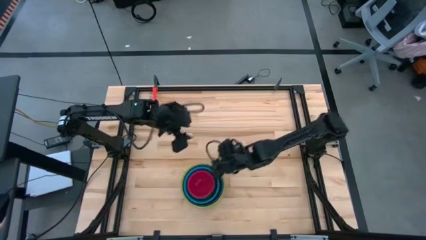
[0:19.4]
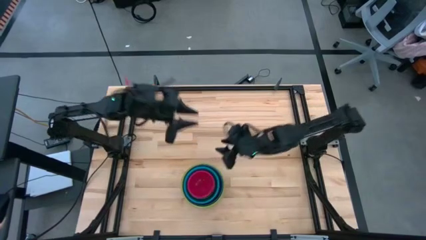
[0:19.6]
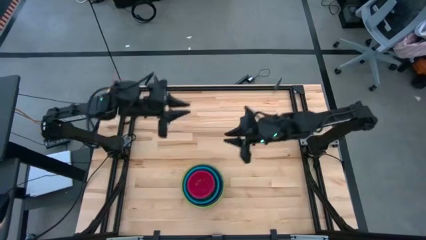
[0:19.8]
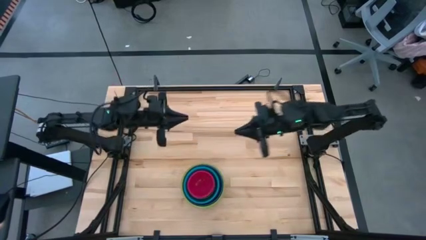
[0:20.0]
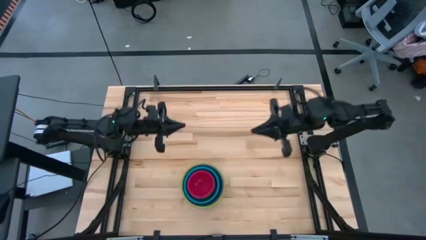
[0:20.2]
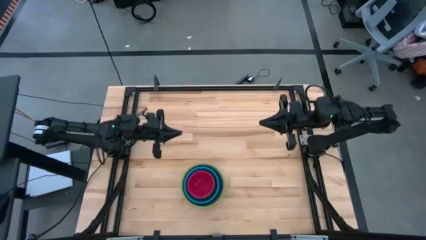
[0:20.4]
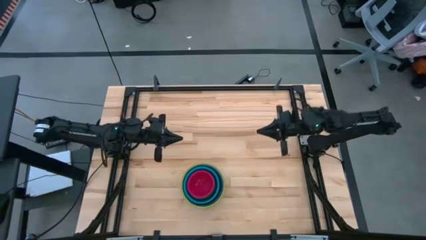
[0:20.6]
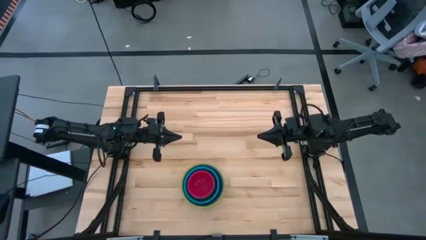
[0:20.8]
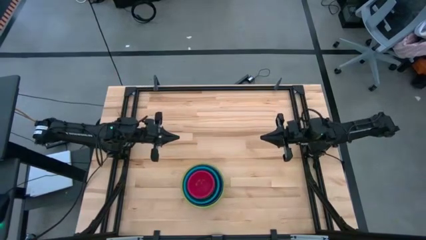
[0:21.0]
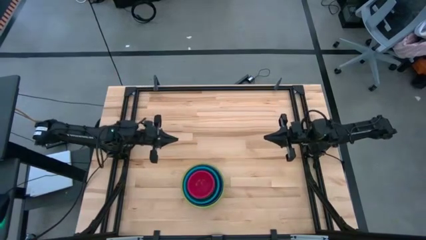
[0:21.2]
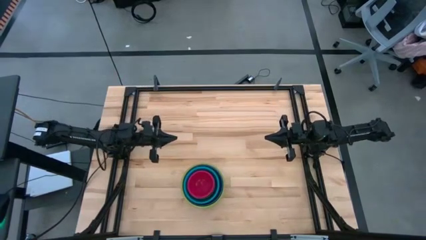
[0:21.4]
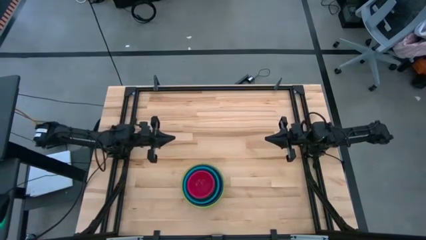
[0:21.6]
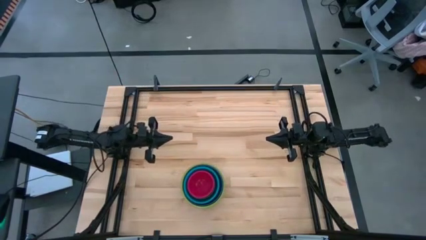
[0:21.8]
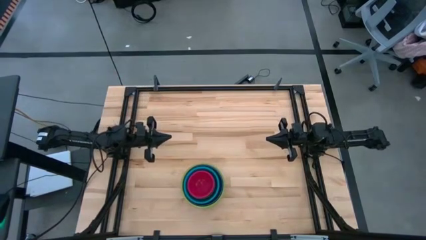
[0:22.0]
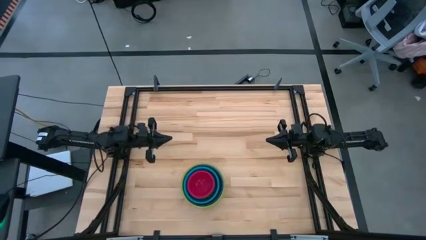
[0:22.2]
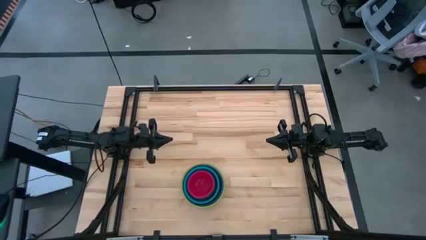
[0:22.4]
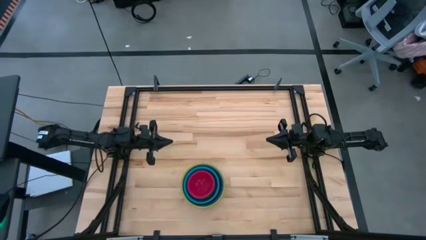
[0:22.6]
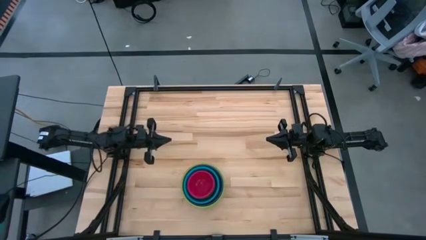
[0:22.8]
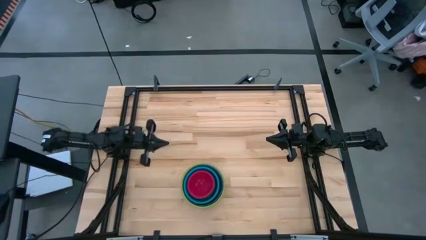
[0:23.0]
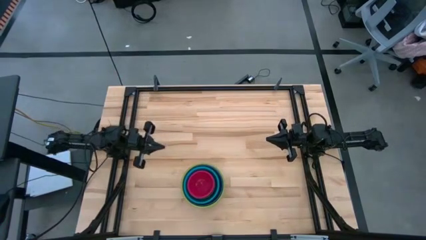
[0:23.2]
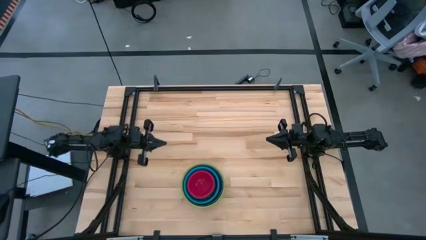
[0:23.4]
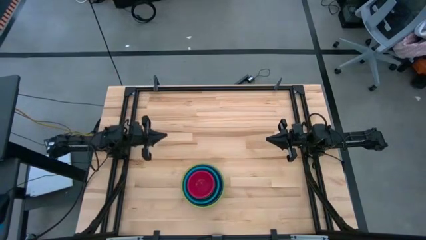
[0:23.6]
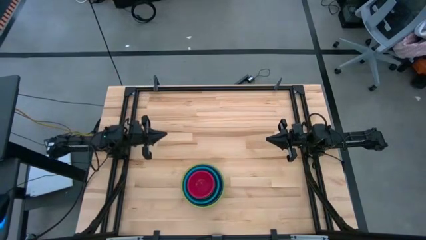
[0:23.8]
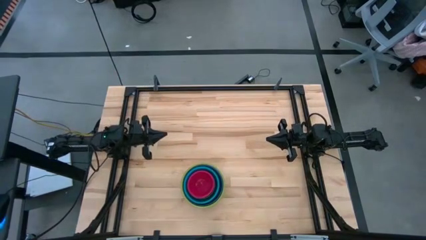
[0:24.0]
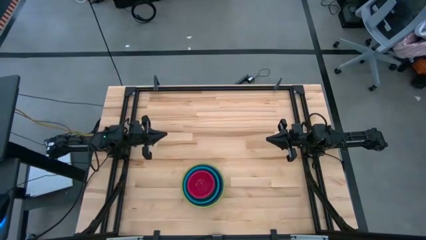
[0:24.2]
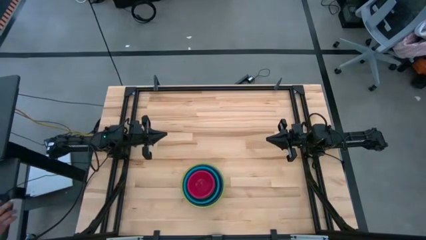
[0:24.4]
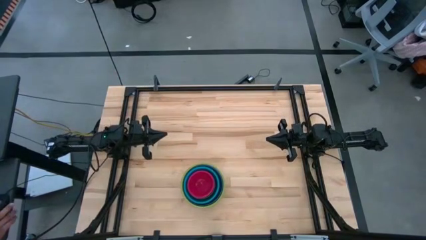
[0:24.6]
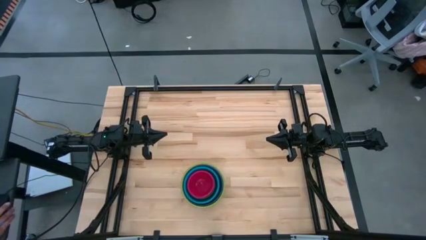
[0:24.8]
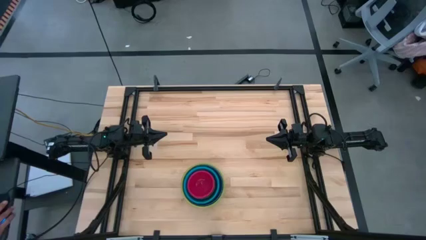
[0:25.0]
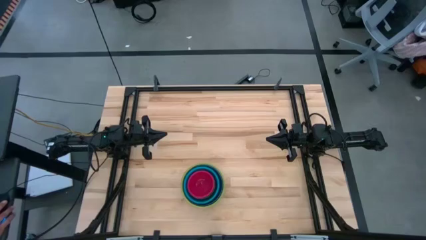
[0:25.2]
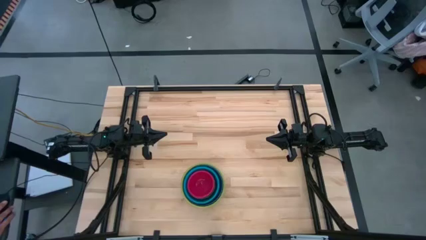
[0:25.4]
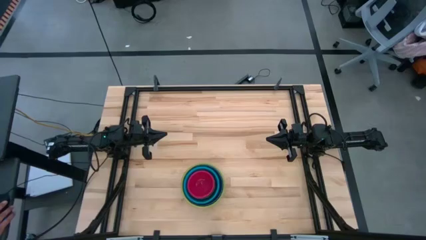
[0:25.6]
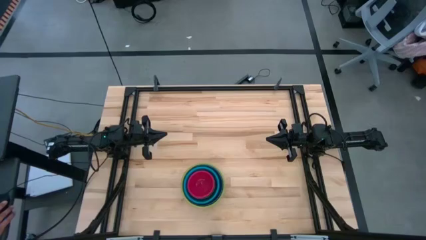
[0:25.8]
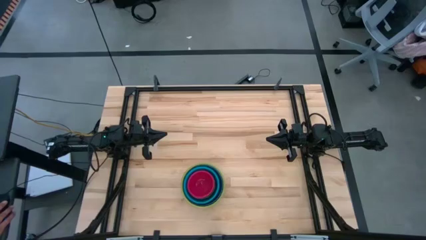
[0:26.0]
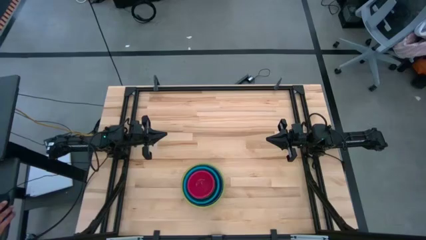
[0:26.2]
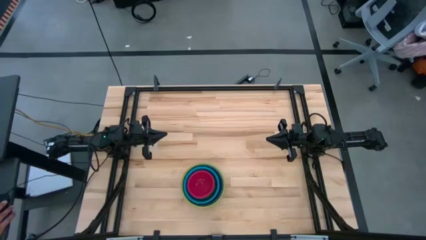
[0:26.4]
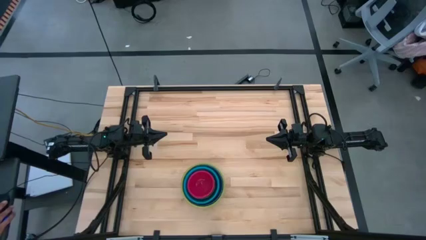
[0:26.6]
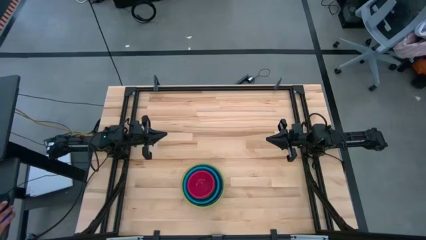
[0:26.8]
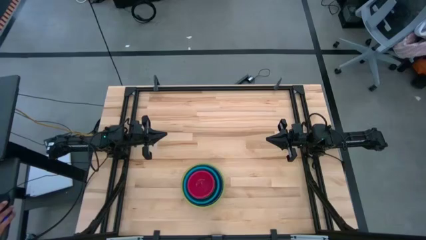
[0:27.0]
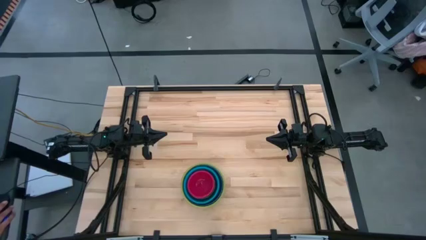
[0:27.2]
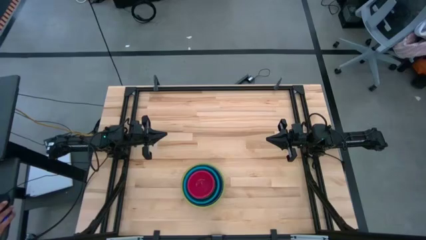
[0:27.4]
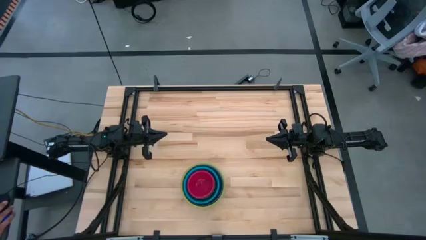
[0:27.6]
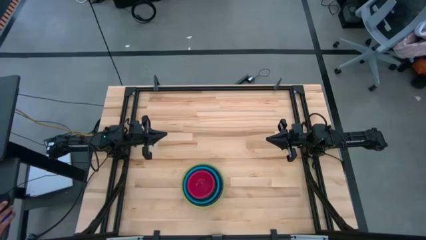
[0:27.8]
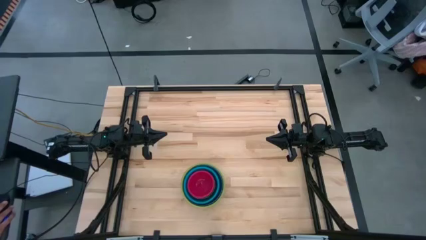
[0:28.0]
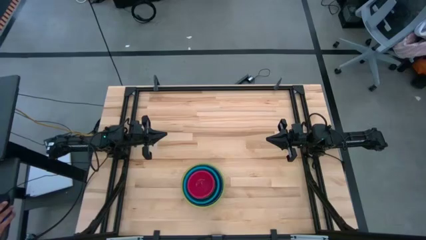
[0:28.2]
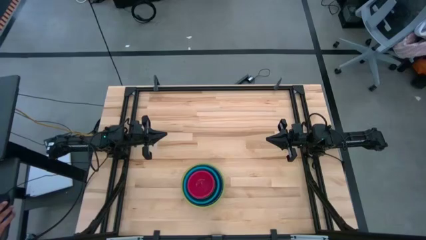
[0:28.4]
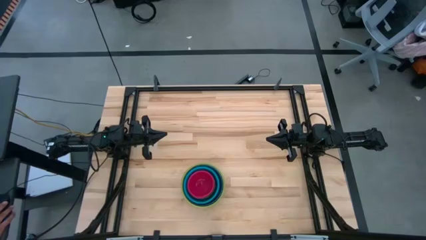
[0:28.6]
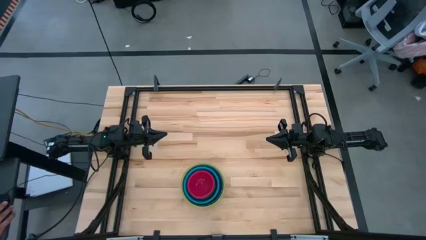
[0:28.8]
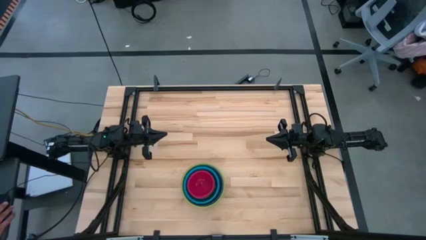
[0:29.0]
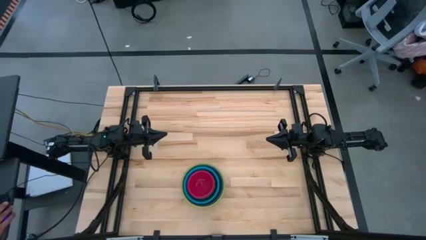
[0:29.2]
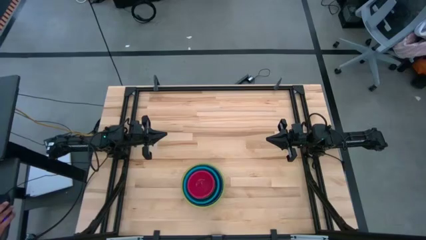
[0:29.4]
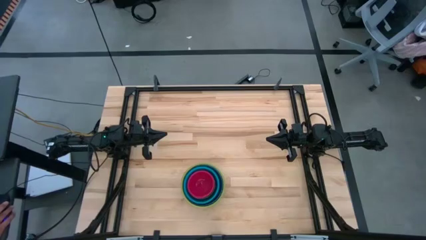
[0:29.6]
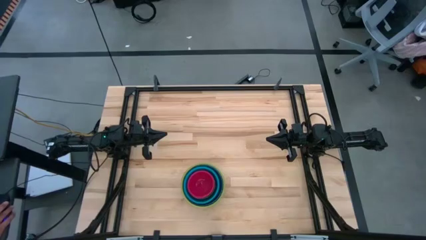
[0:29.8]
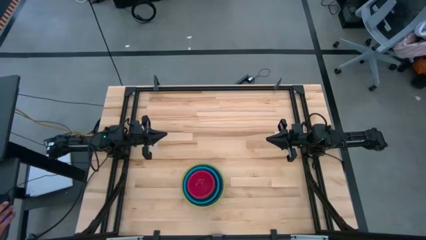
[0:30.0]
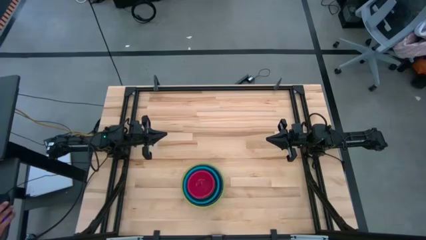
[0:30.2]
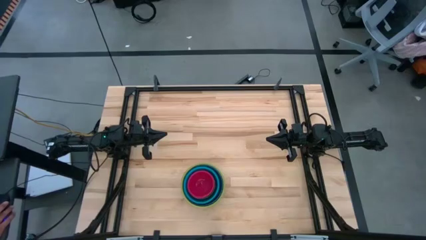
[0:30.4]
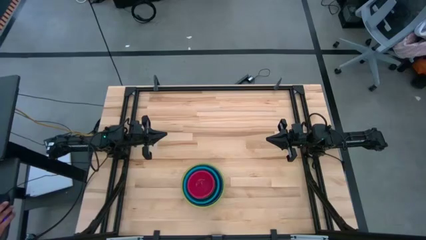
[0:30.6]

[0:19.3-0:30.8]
Return to Home Position

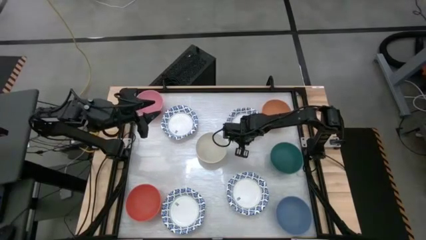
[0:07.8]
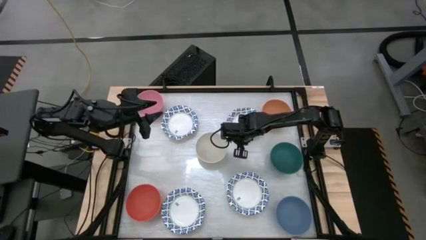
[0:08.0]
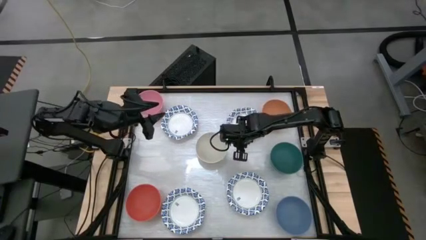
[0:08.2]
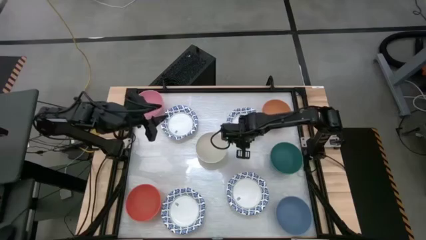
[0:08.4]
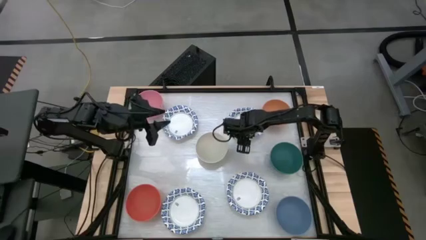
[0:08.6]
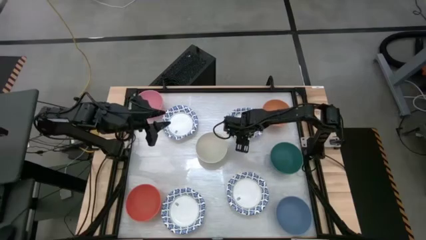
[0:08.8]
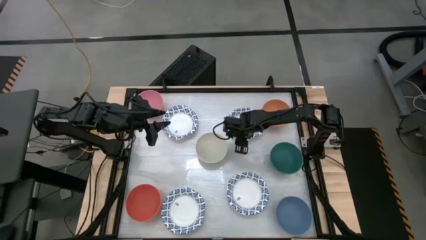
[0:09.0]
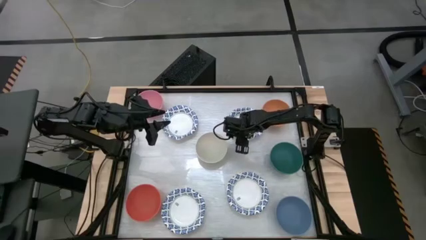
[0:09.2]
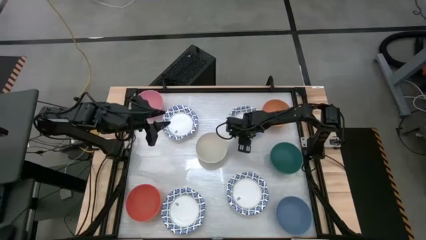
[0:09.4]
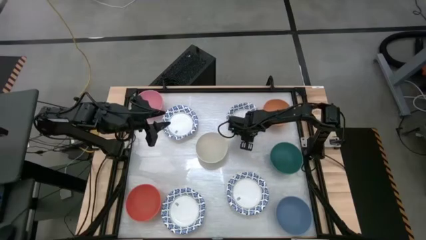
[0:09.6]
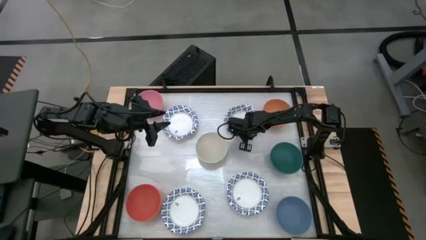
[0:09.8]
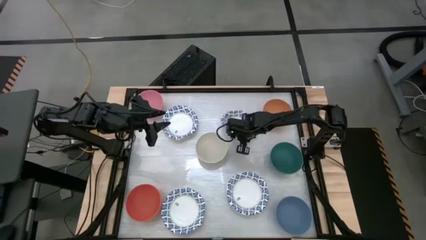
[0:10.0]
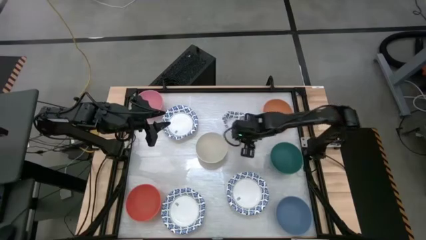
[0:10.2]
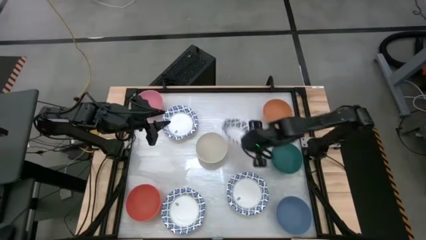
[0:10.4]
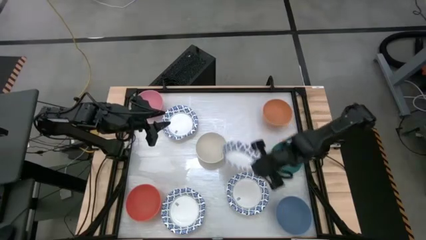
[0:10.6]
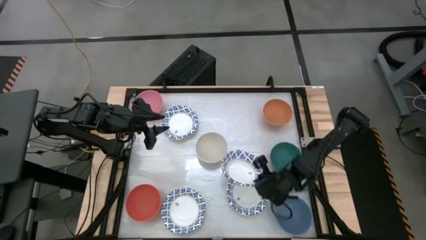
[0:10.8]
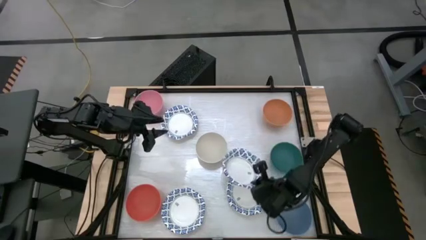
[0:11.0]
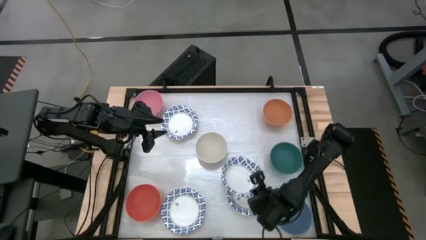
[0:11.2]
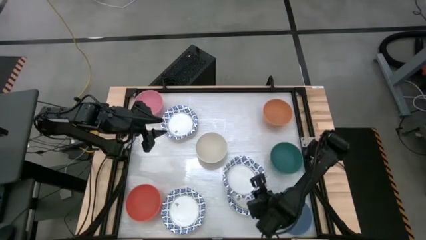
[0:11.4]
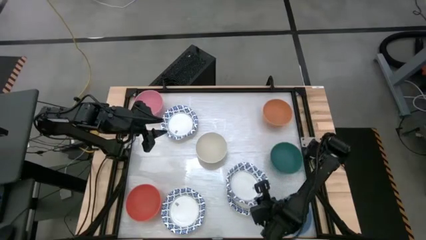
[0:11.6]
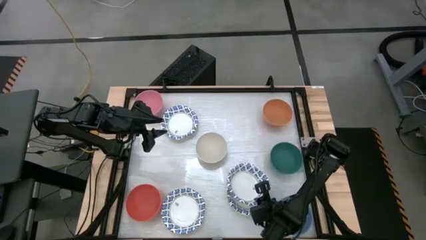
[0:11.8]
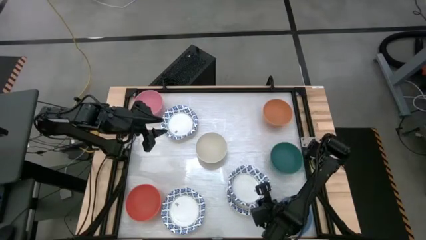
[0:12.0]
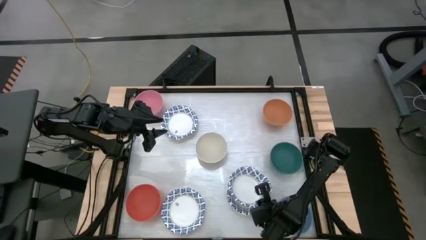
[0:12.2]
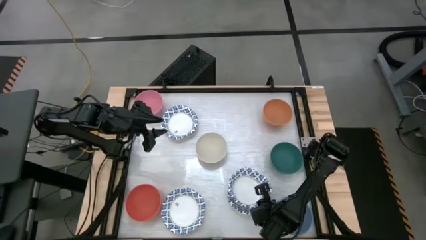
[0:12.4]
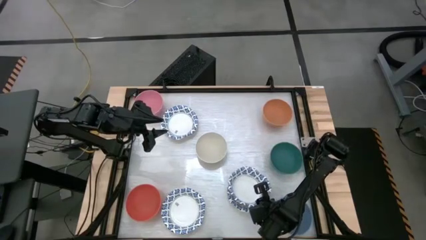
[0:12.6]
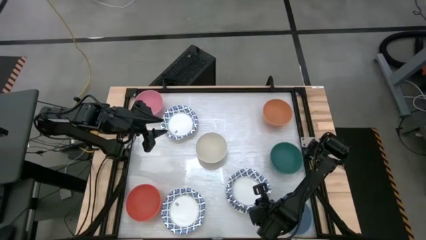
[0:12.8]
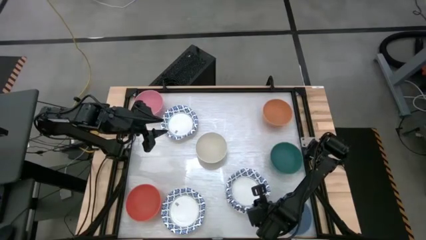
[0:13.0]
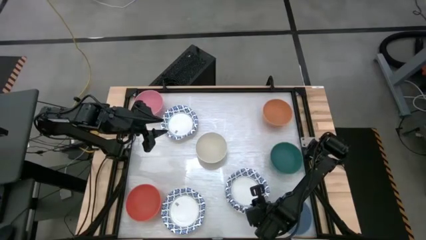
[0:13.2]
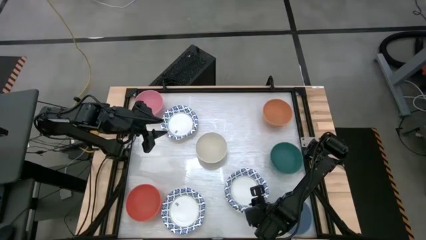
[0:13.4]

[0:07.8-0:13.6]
Stack the white patterned bowl on top of the white patterned bowl
